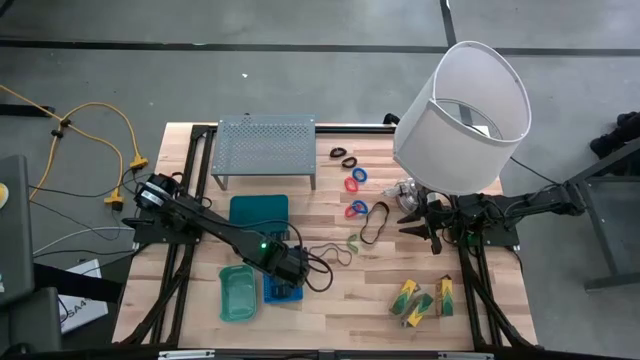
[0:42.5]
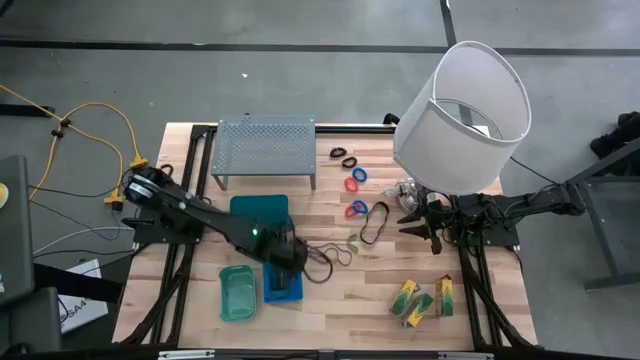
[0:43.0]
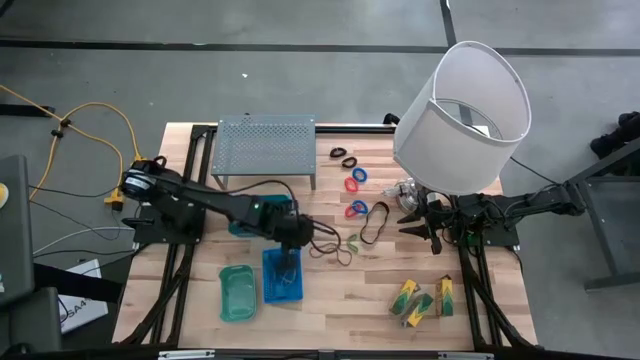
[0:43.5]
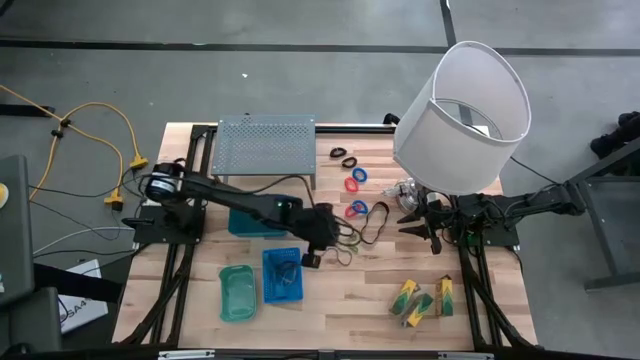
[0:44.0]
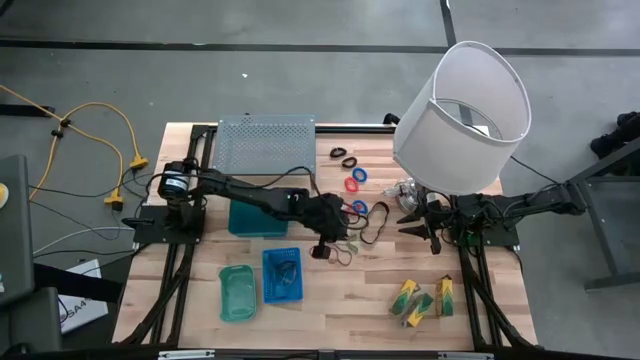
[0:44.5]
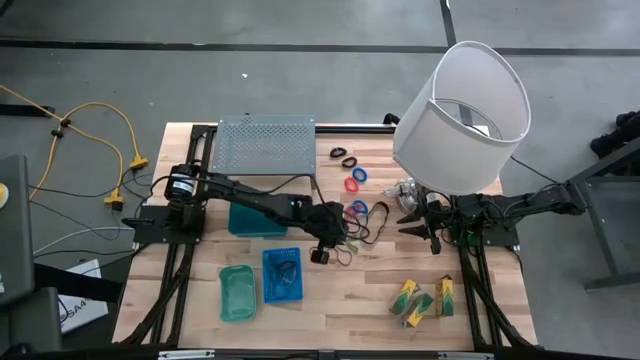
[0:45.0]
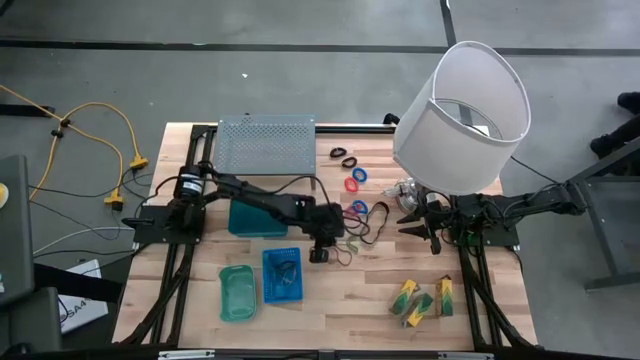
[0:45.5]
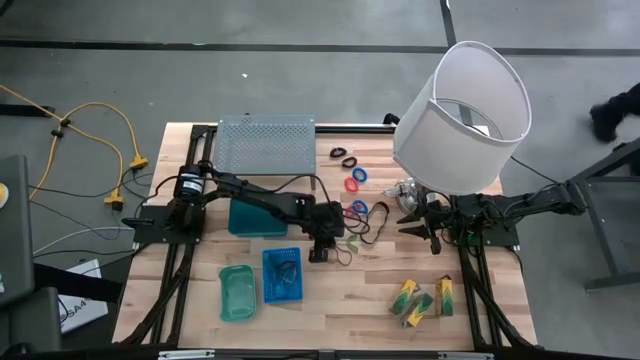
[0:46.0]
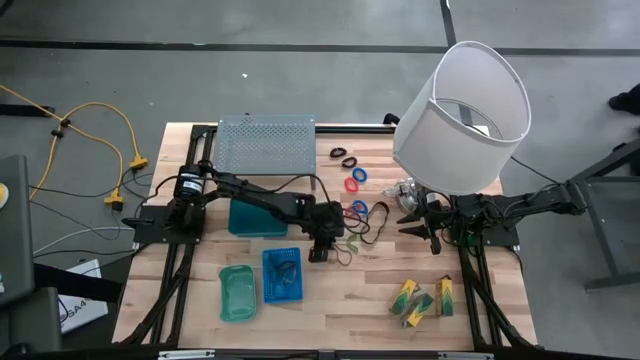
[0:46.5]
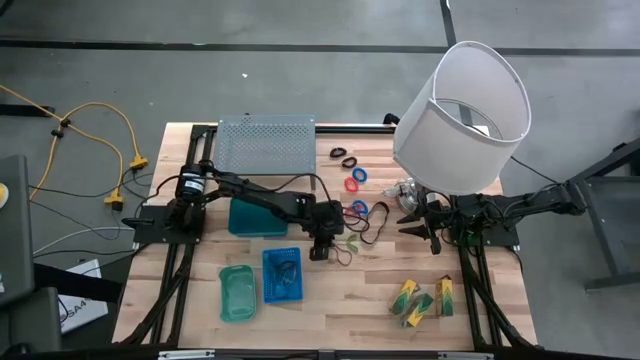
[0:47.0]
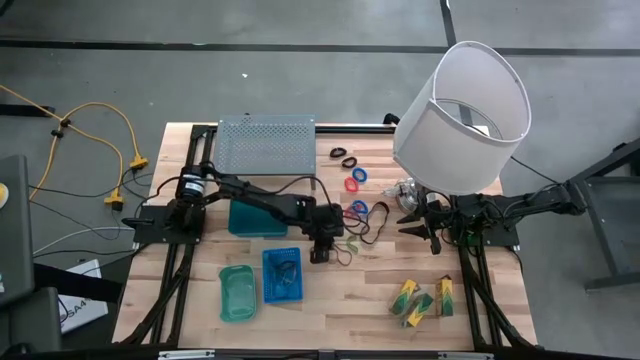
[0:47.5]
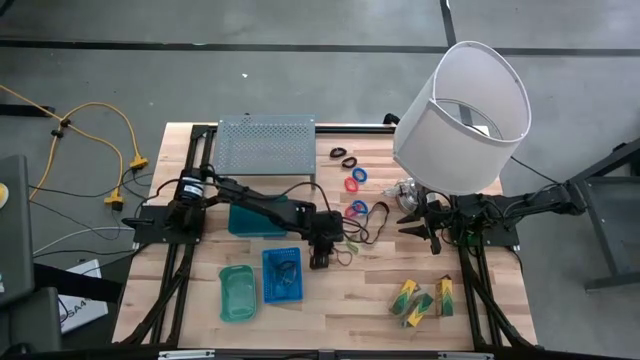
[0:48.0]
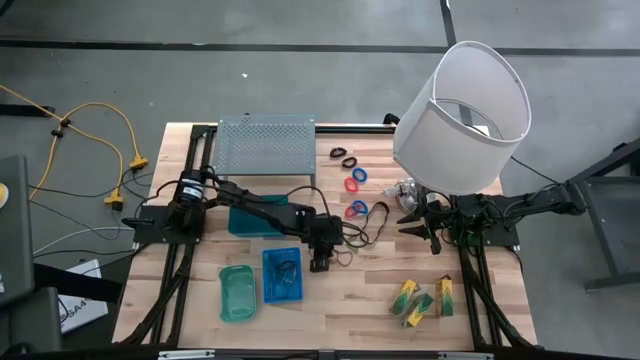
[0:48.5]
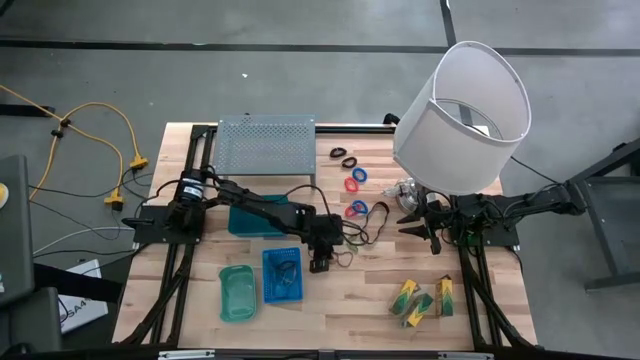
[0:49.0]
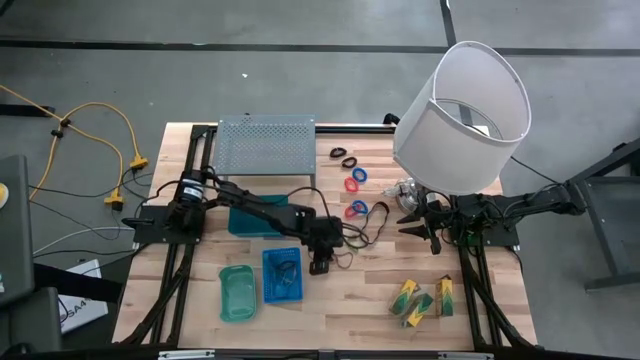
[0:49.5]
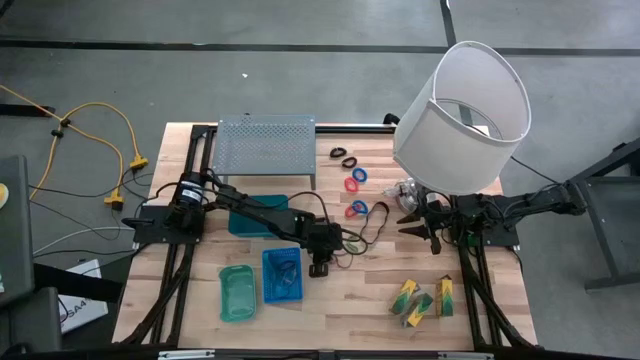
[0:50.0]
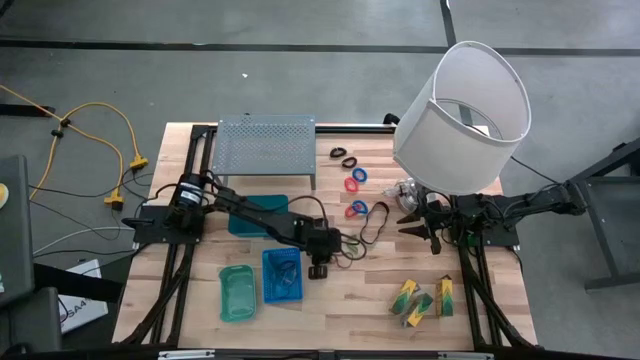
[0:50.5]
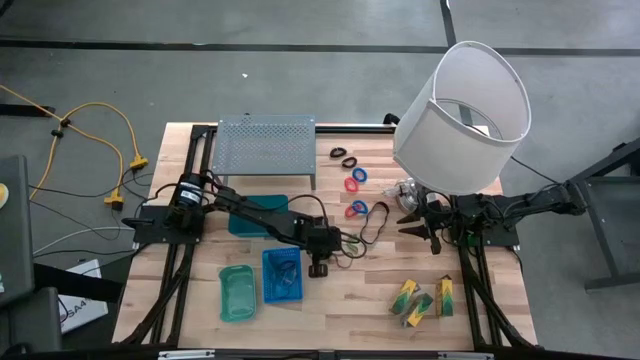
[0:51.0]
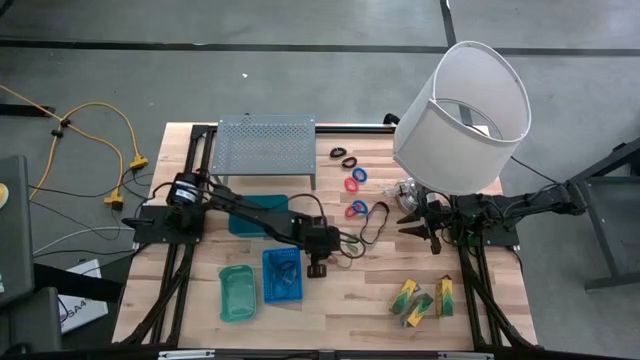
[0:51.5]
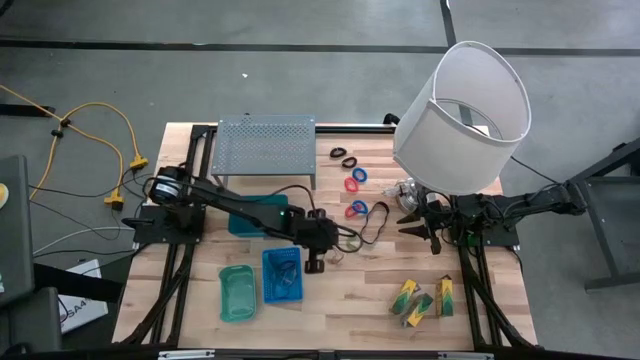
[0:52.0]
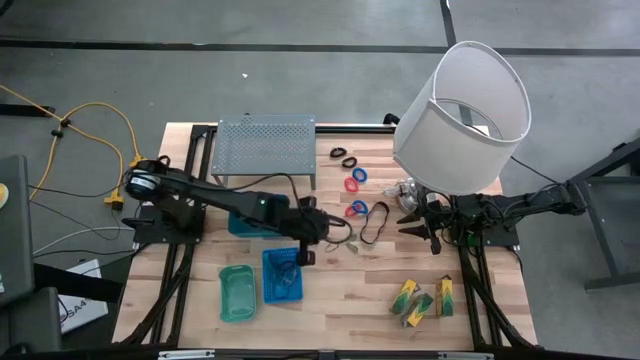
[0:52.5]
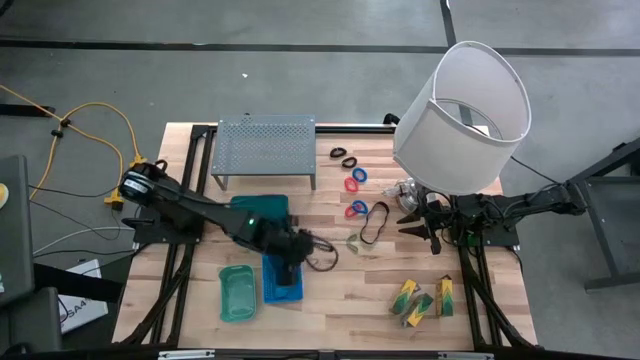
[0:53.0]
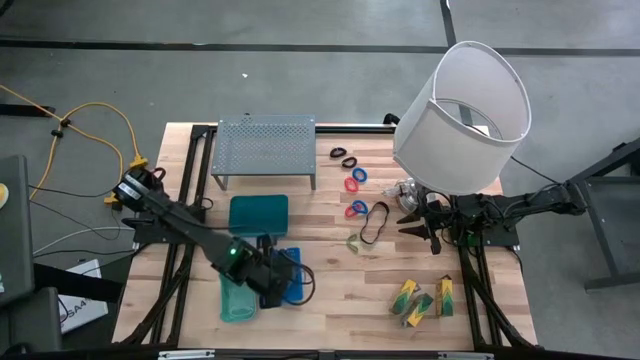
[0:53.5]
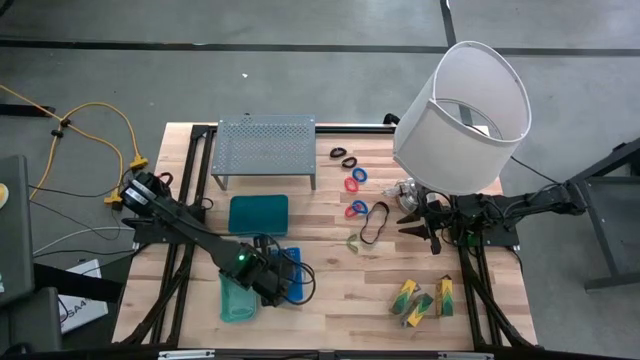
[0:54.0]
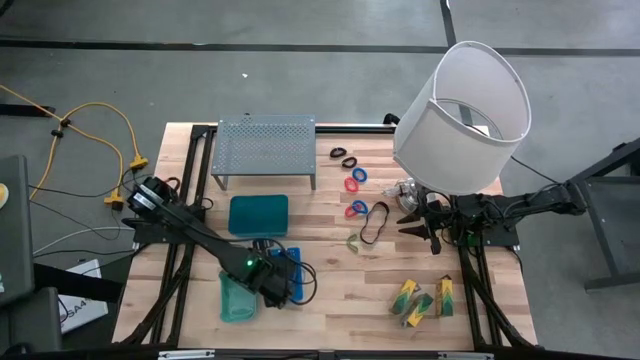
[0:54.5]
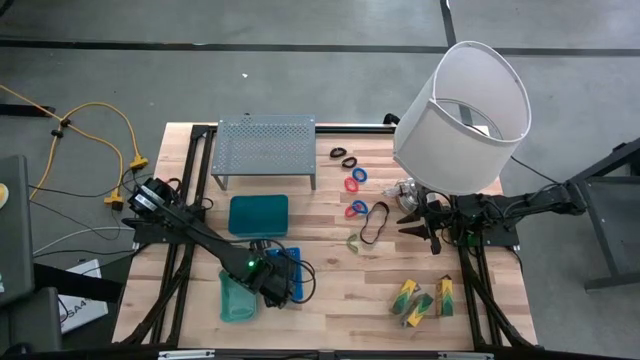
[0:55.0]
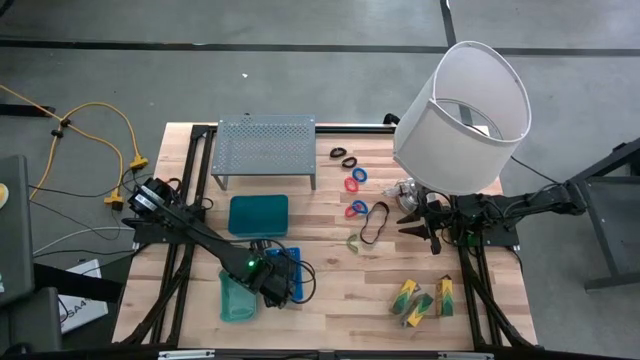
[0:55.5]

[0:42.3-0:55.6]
Task: Pick & Place Office Desk Supplies
Put the violet rubber band into the bottom blue bin

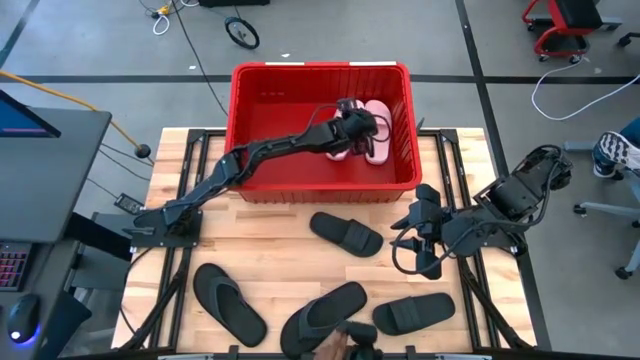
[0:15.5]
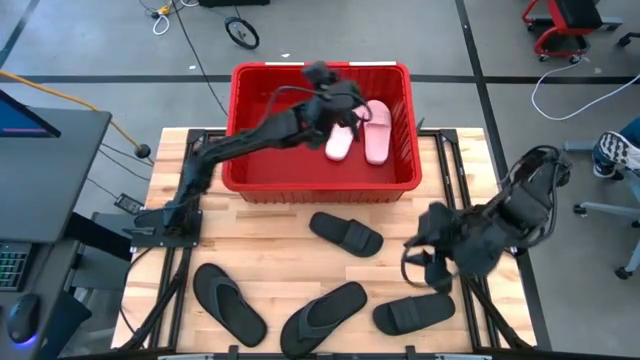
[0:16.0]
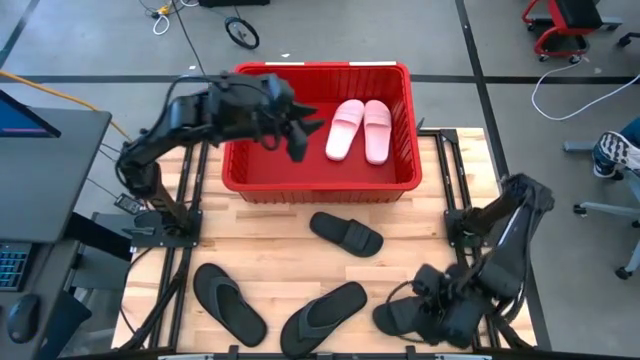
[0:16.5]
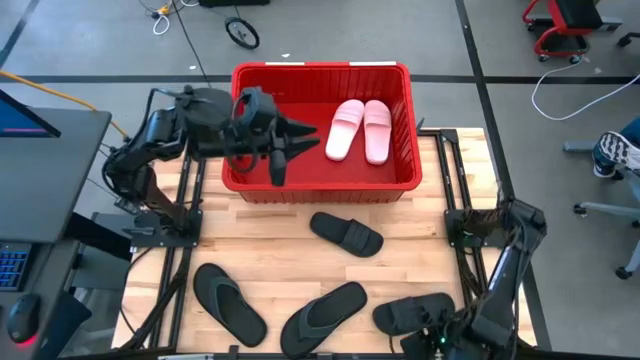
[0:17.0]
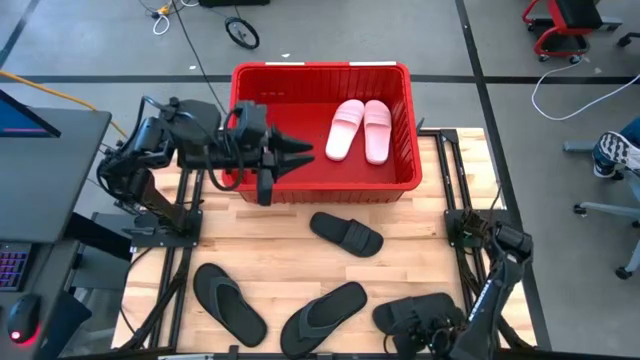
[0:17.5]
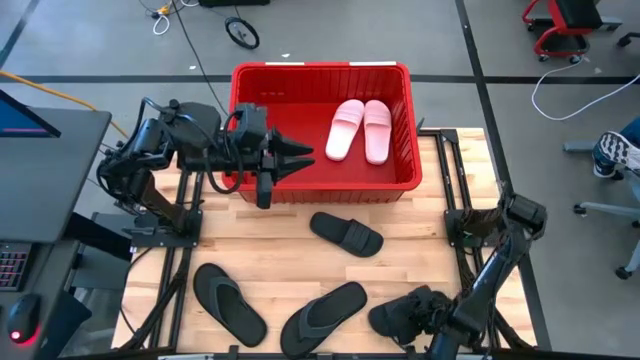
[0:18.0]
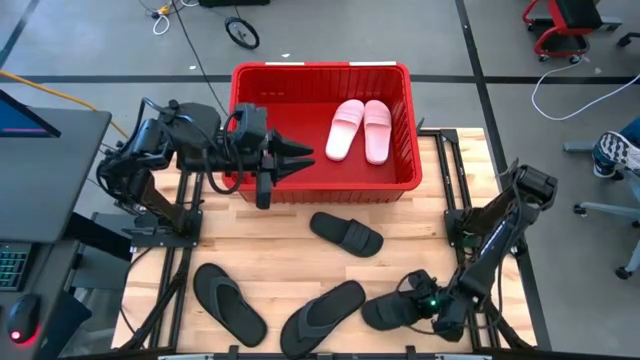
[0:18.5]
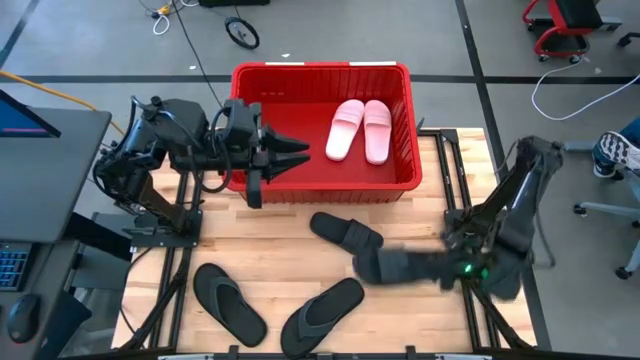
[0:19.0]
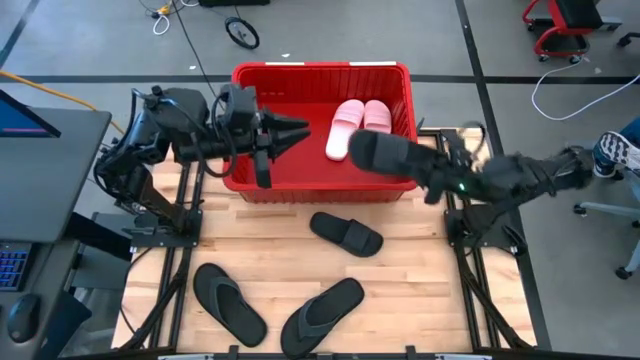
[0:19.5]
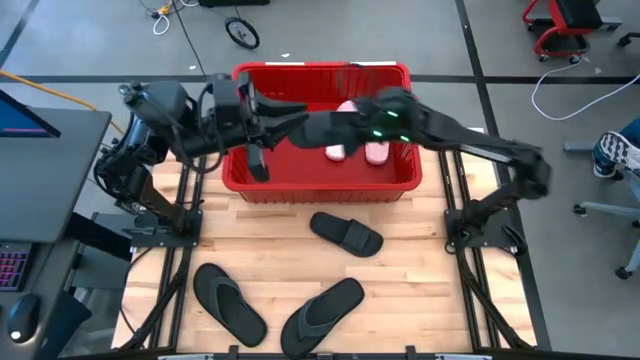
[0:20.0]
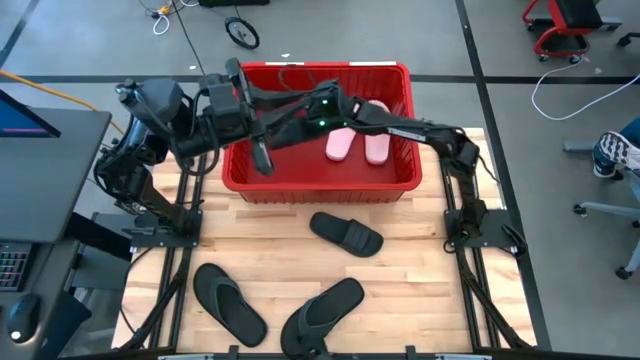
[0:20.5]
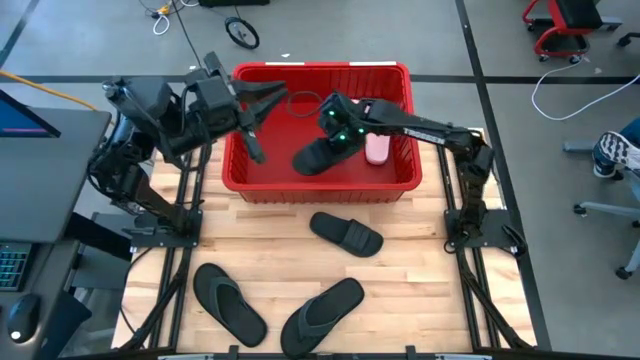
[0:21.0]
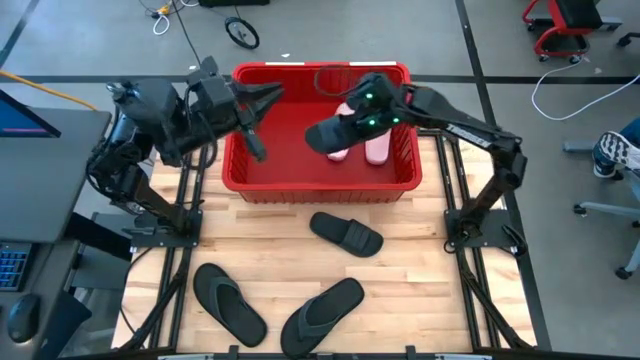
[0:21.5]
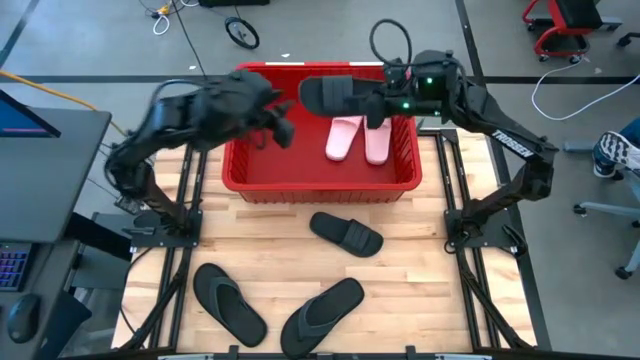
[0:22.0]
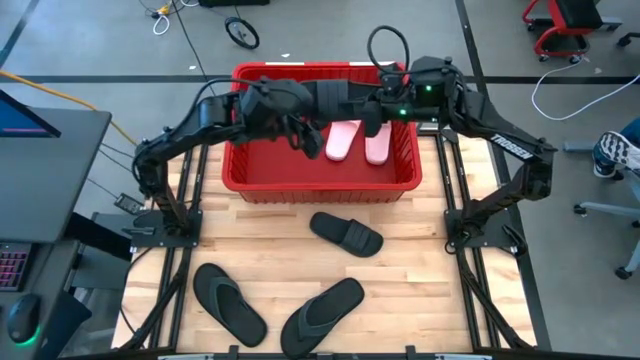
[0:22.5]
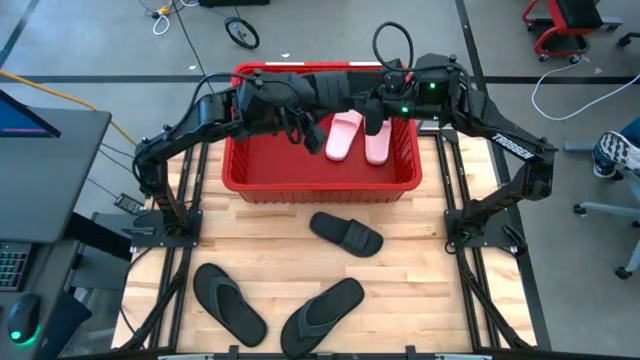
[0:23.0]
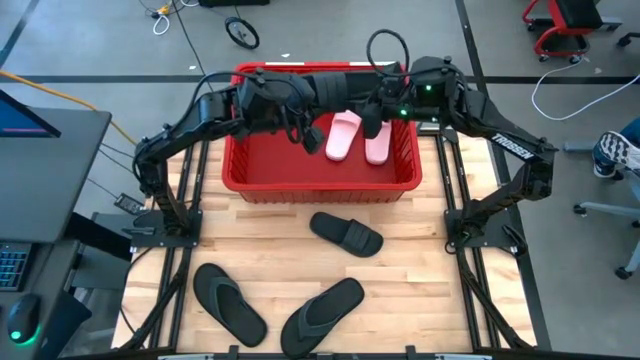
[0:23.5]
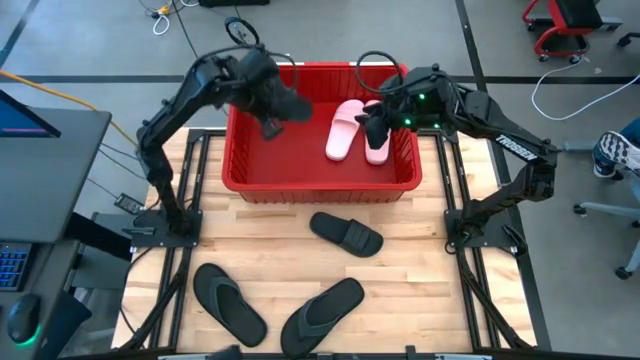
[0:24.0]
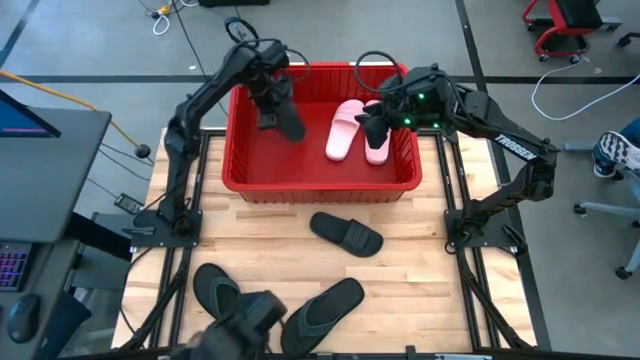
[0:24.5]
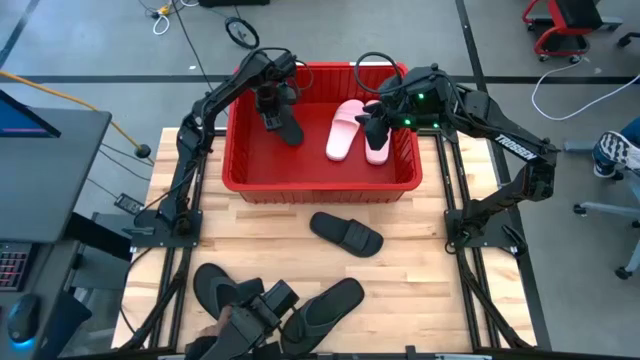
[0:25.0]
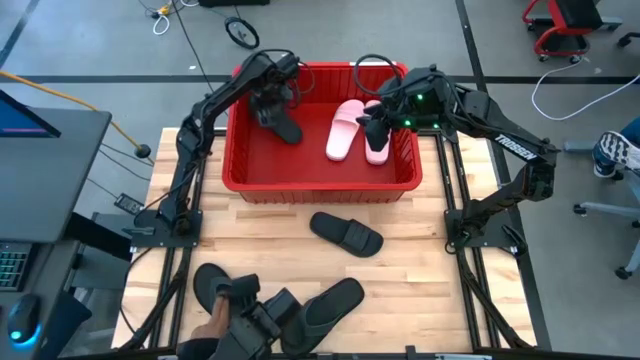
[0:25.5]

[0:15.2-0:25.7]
Task: Pick and place slides into bin
Put the bottom black slide into the red bin
